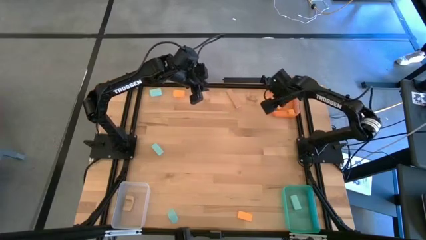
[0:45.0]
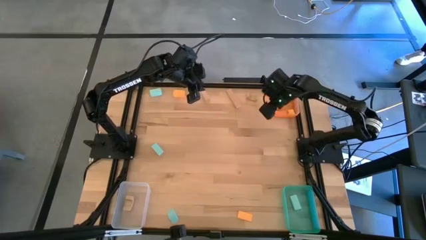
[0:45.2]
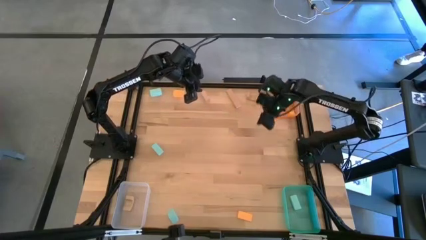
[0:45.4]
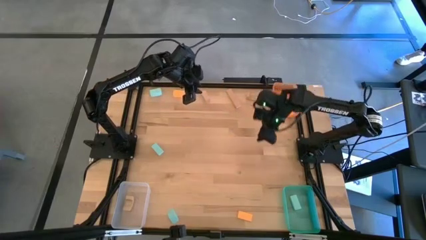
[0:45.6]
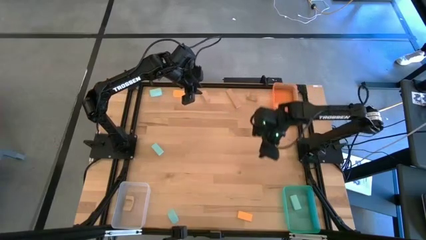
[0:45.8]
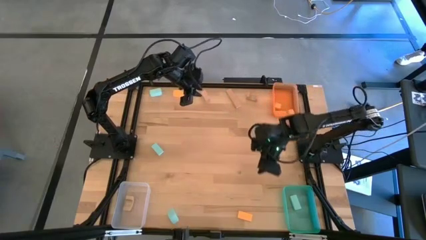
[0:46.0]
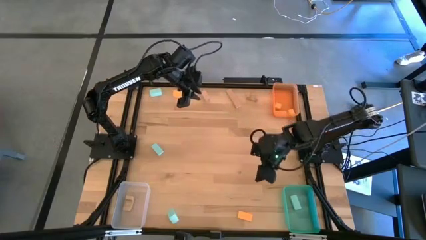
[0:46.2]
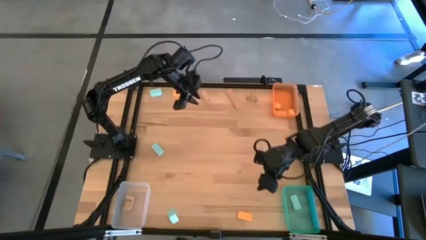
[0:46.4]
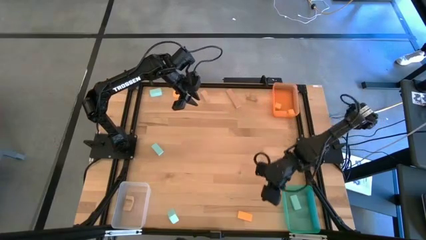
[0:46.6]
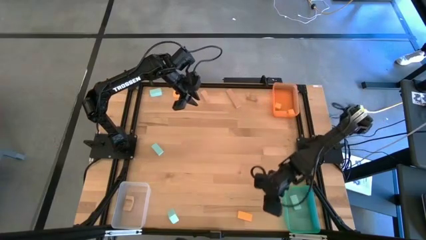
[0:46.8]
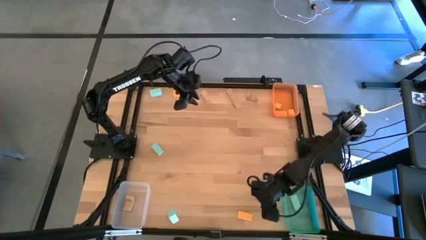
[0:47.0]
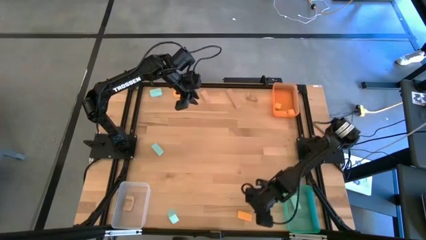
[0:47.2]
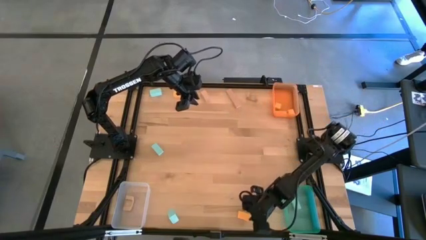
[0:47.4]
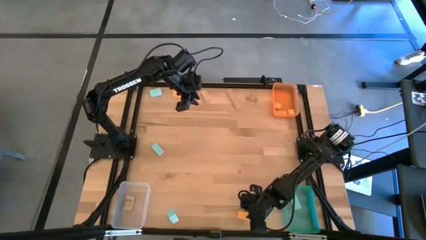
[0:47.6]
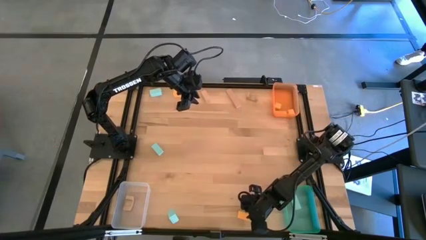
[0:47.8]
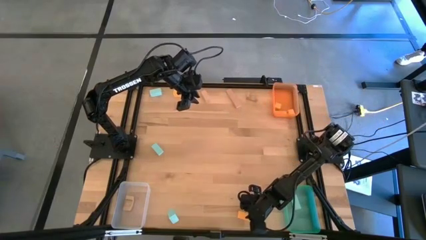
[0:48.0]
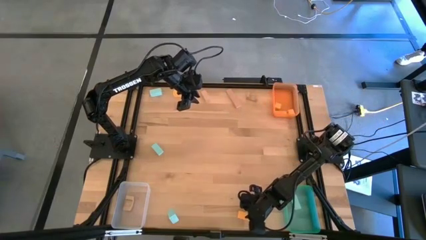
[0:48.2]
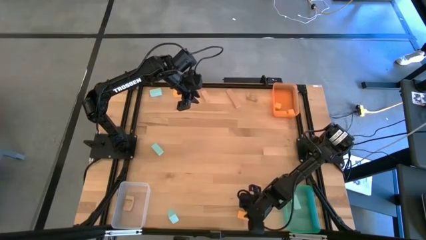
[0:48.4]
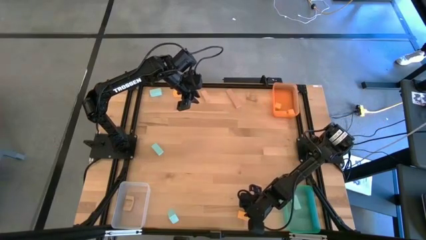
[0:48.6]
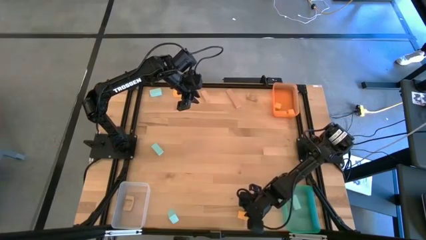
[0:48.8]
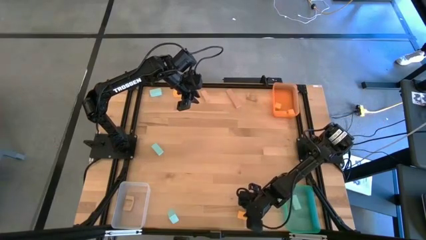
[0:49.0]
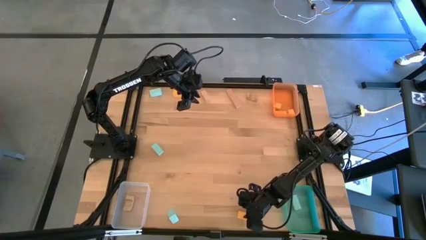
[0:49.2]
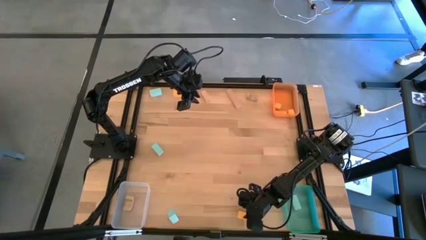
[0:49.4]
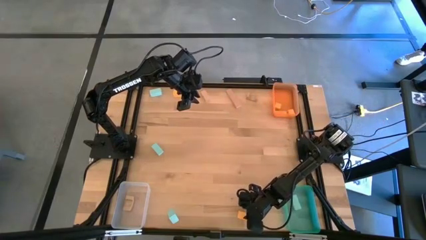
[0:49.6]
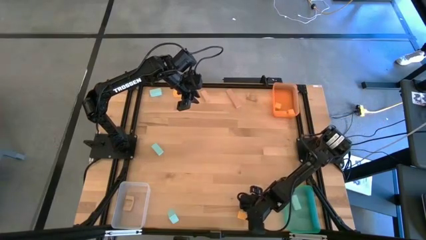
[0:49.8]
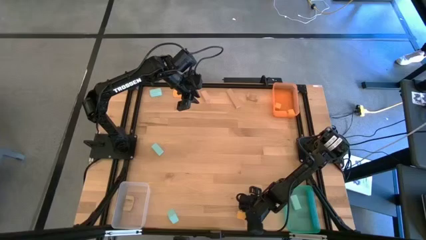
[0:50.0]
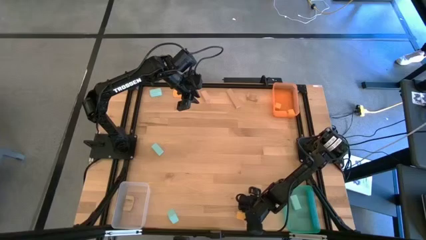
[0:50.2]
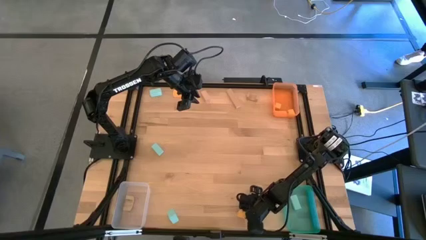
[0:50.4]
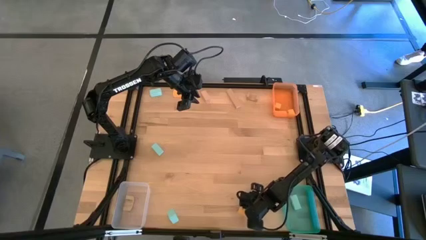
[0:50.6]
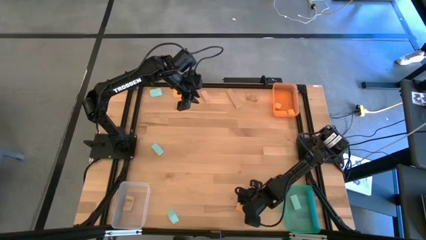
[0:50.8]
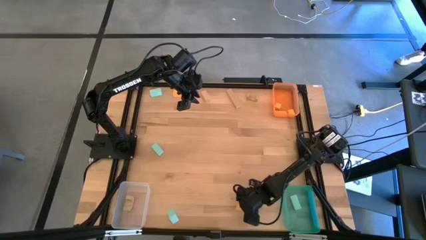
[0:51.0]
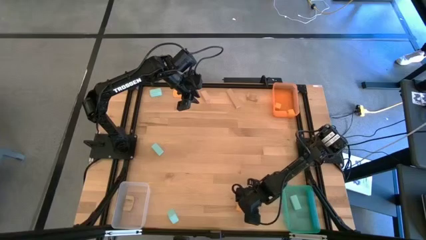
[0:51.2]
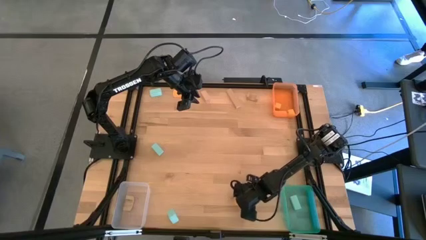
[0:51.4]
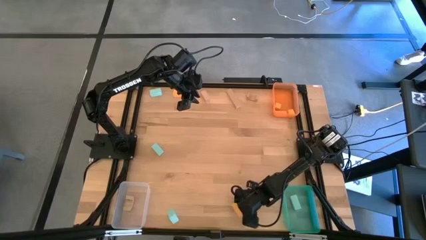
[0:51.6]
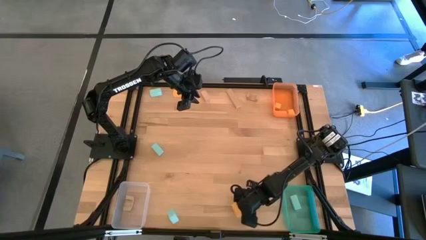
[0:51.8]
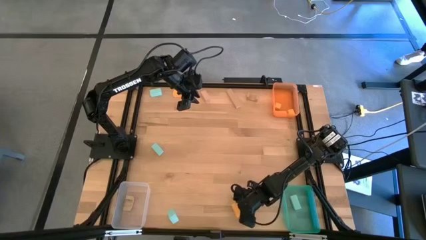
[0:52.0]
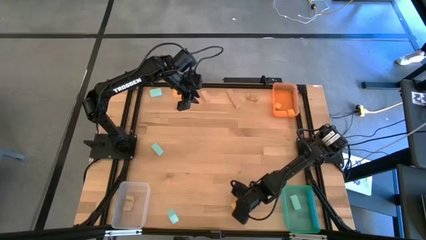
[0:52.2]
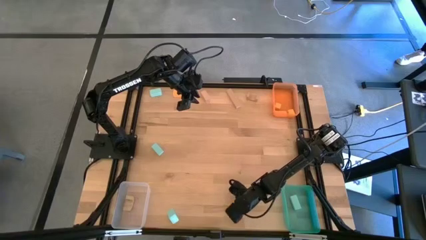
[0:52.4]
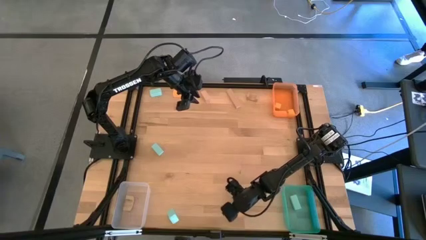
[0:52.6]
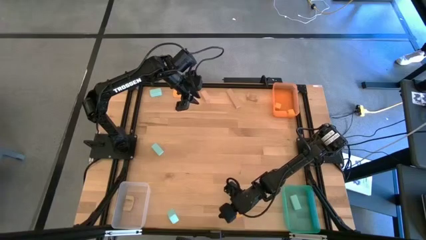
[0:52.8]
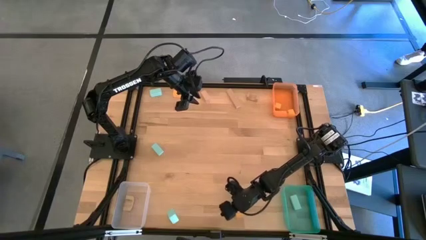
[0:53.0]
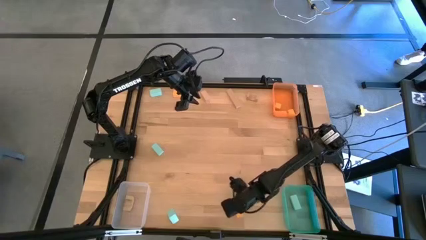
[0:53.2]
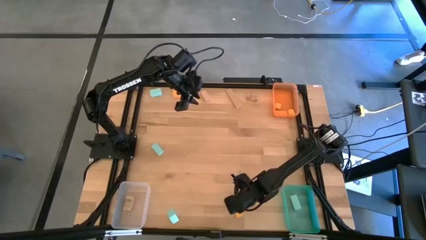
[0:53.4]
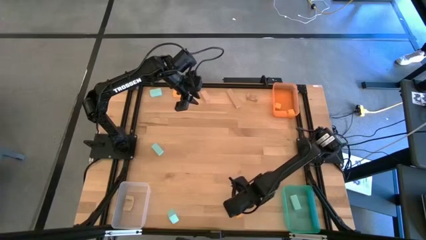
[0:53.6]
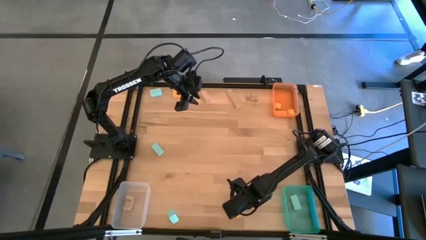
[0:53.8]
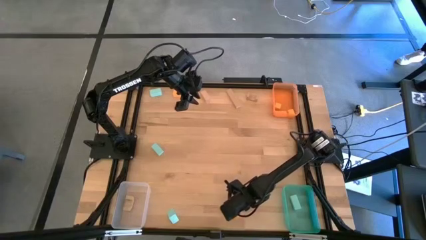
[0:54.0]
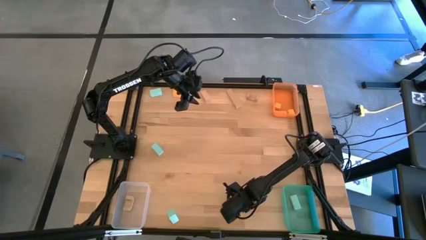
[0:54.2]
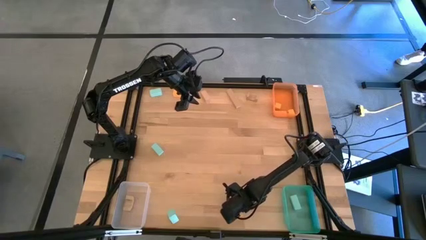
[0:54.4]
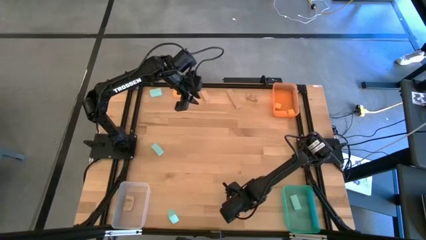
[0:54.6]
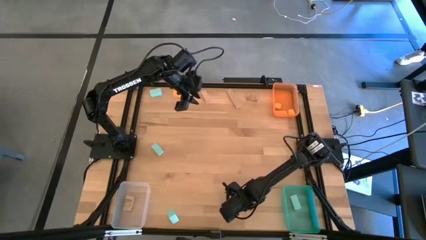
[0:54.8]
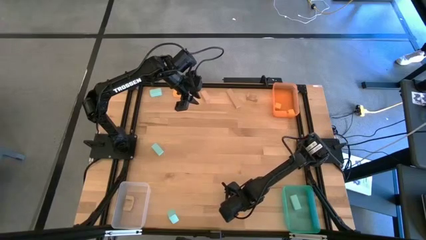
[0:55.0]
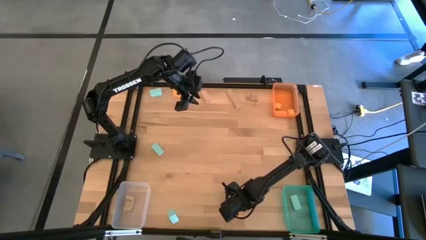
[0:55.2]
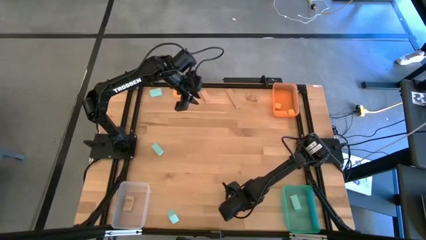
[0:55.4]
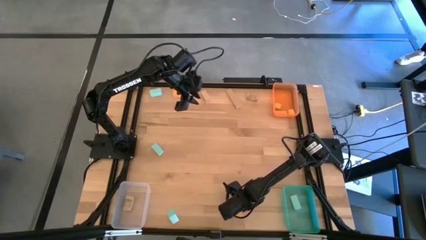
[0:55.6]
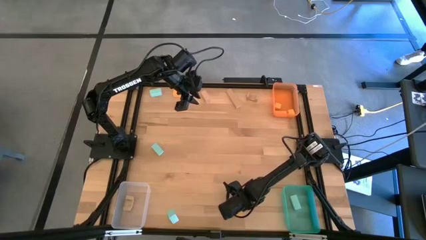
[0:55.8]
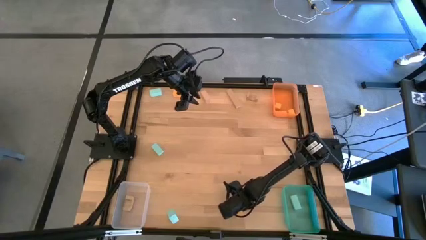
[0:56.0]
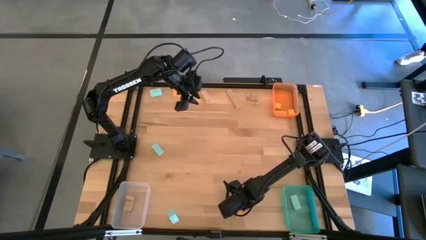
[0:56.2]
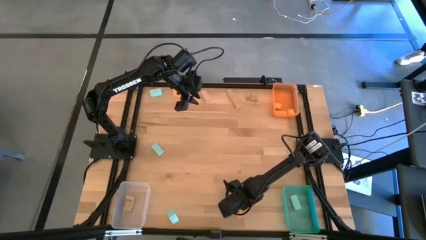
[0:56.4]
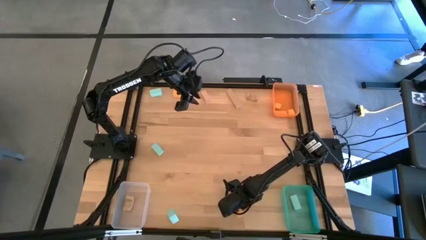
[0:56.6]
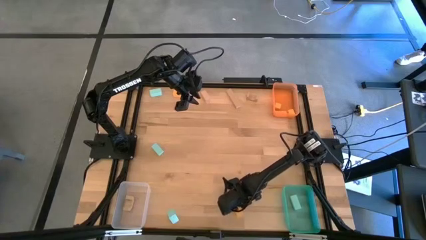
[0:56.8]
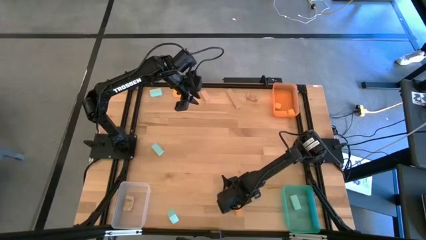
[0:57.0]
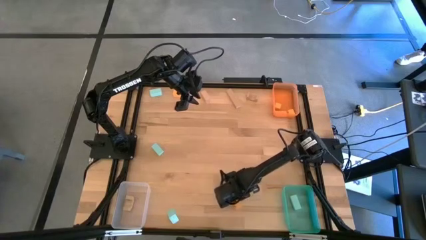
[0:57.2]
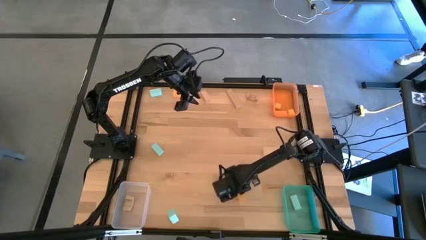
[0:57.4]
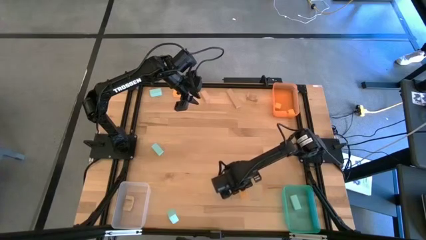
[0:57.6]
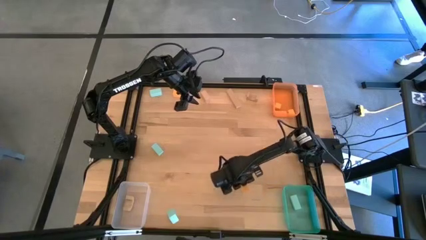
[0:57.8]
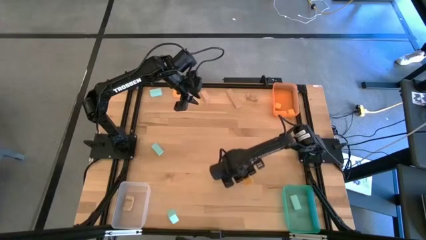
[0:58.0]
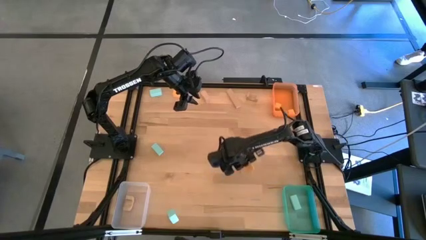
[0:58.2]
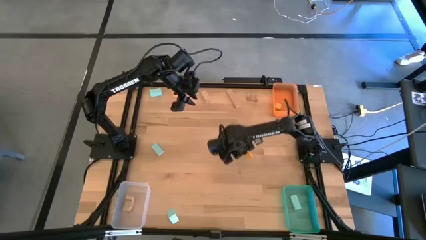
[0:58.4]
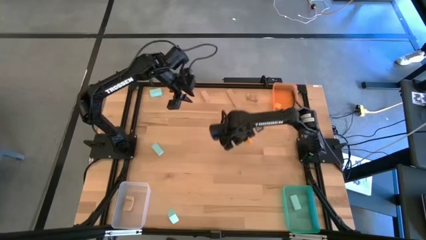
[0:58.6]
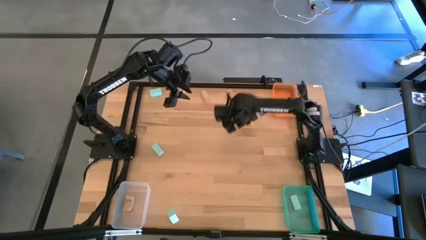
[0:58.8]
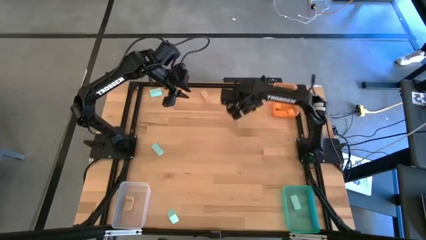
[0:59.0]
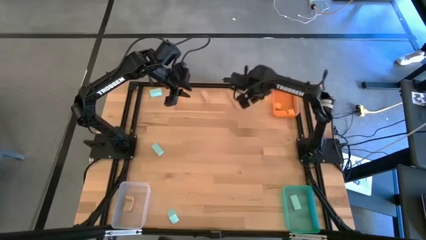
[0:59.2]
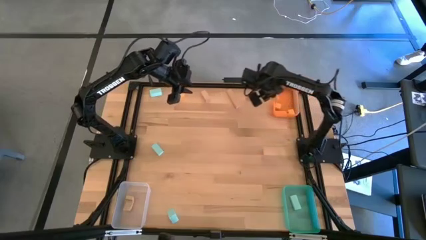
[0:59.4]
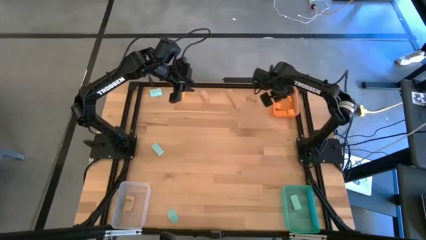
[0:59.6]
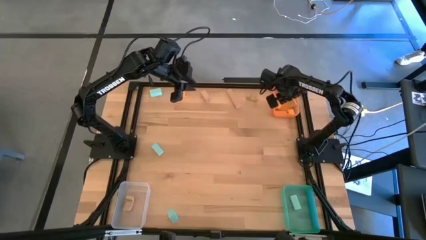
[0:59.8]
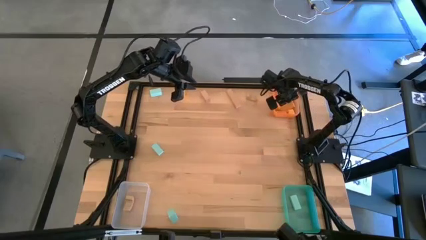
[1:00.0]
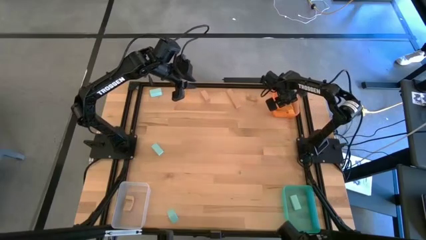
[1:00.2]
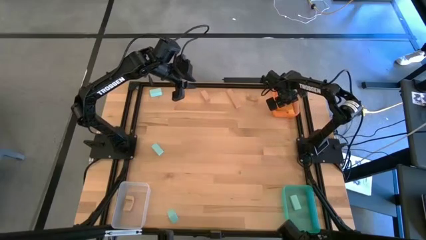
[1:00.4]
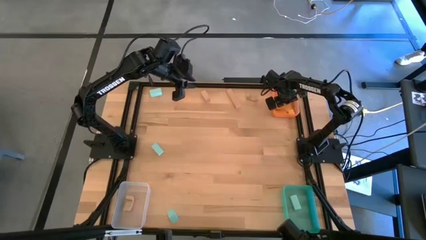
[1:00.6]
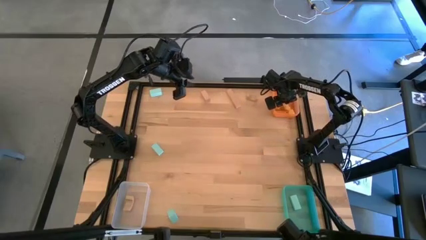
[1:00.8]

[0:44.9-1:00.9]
Task: Sort & place blocks by color
Put the orange block into the orange bin
